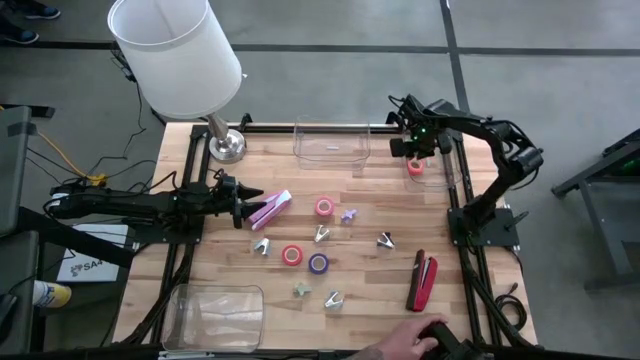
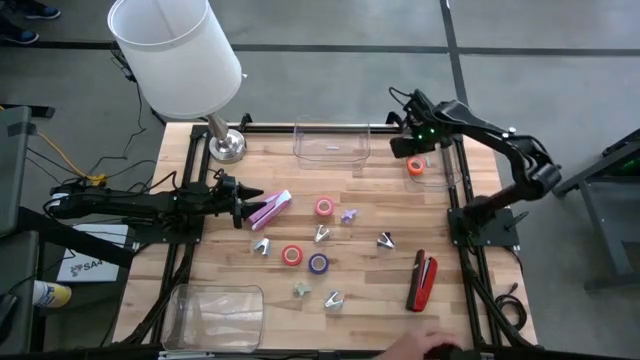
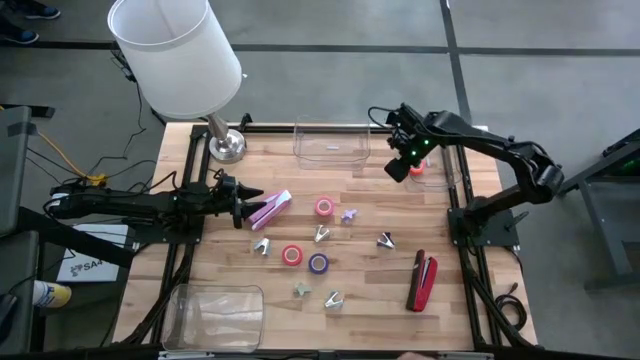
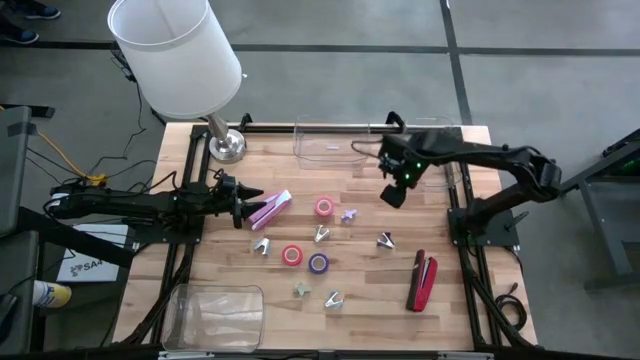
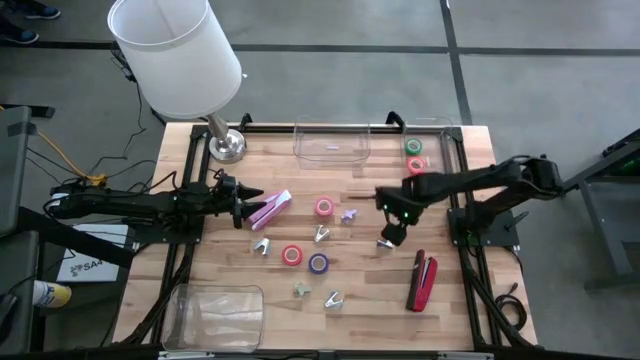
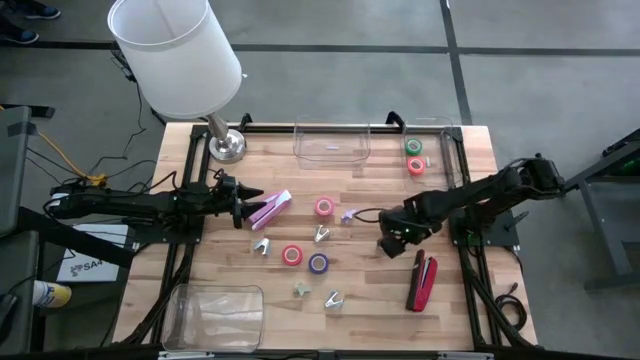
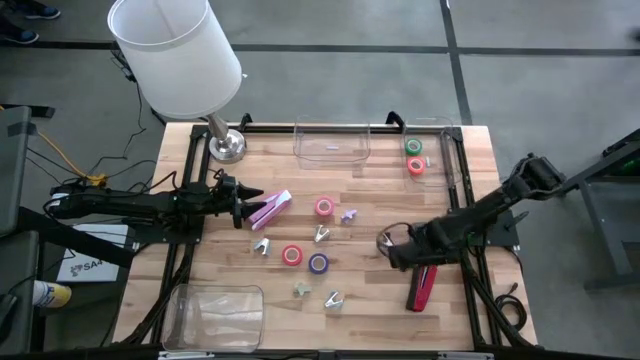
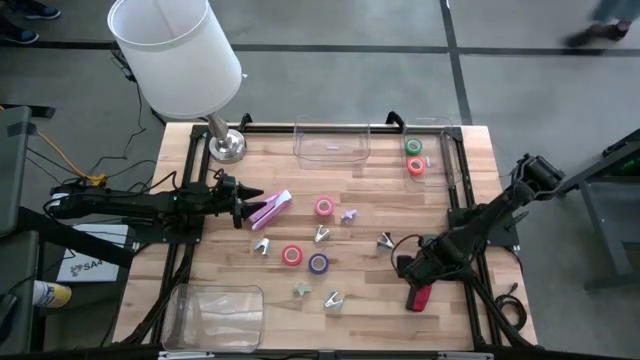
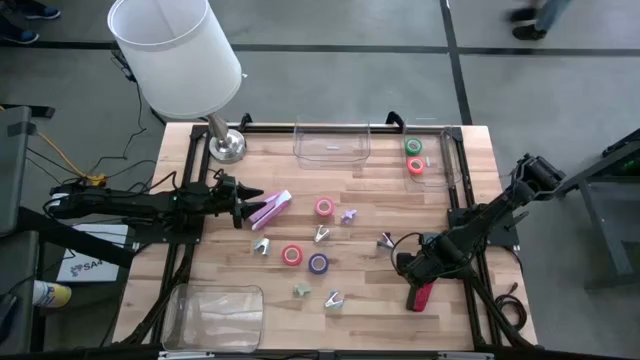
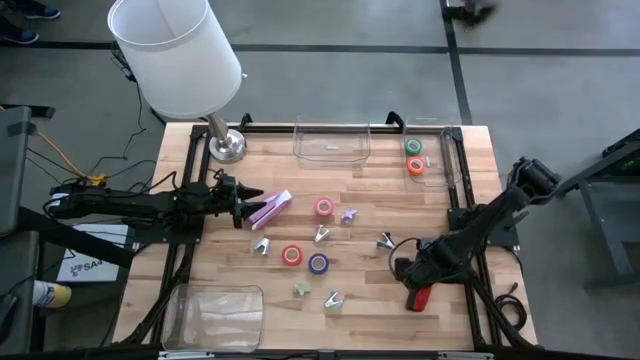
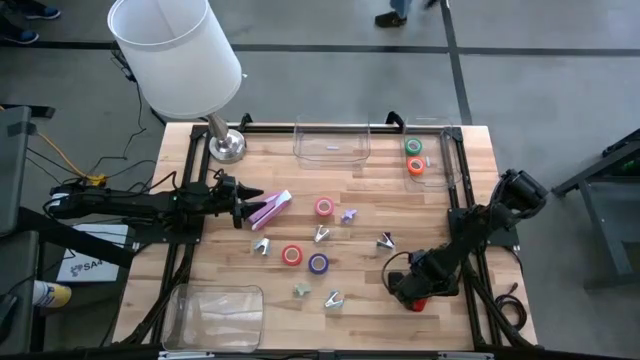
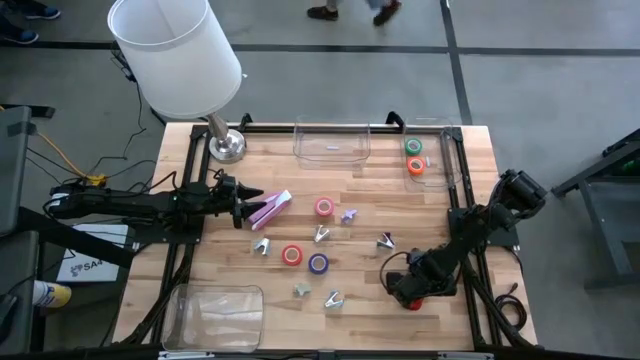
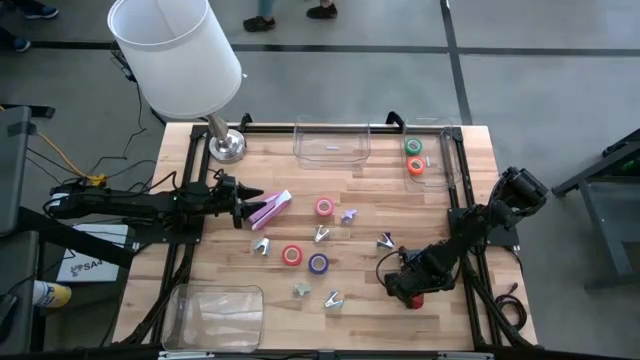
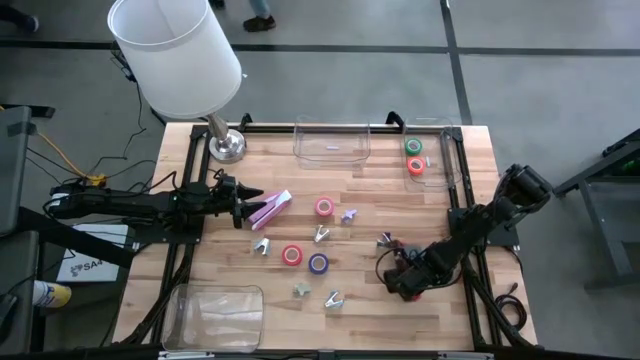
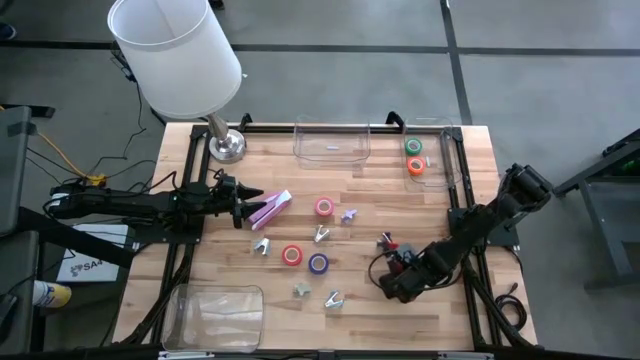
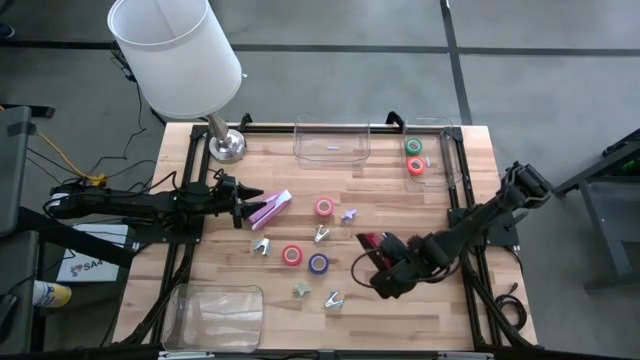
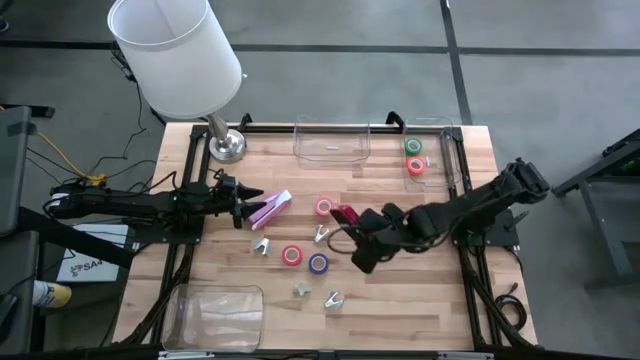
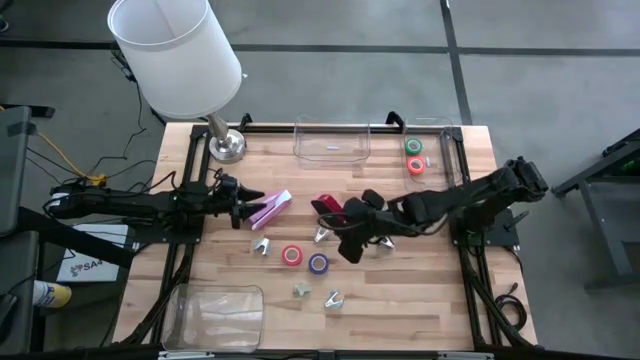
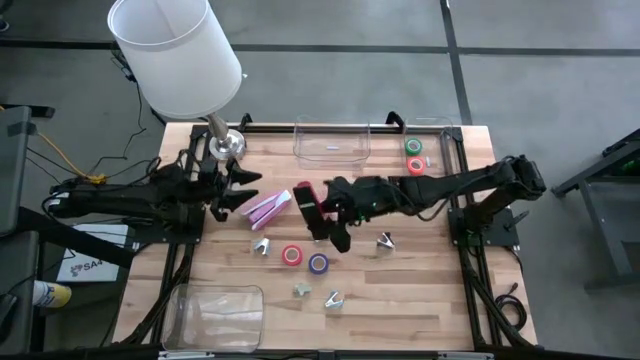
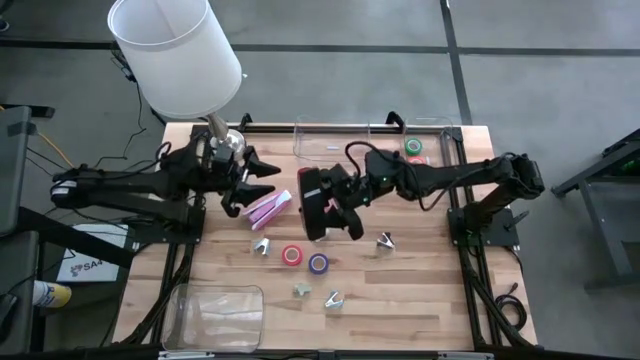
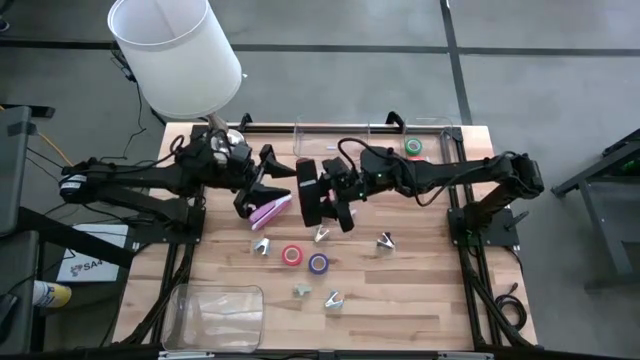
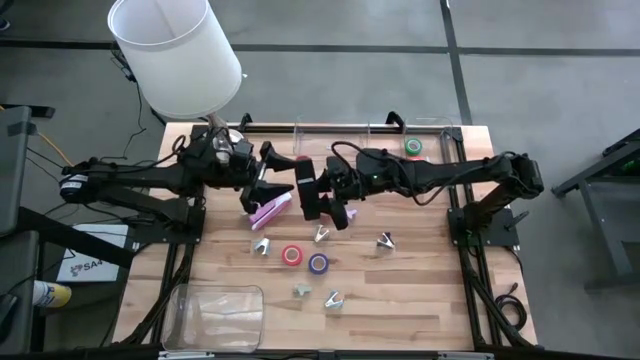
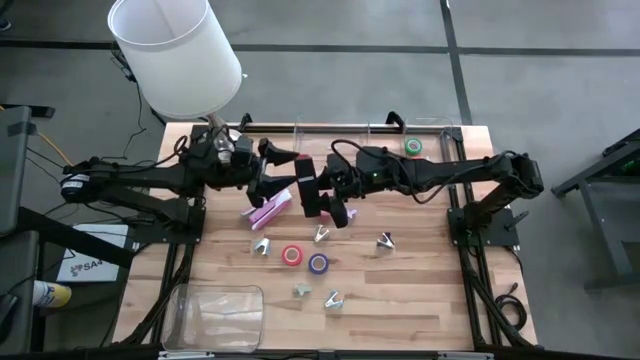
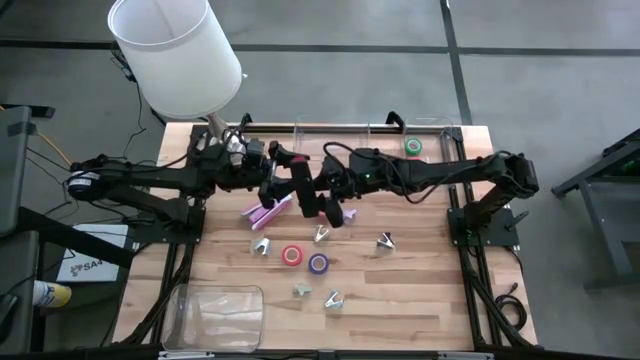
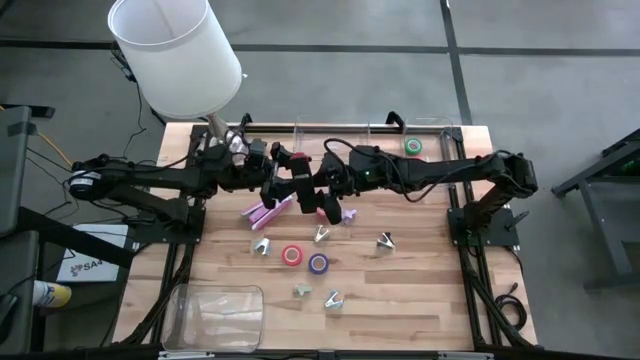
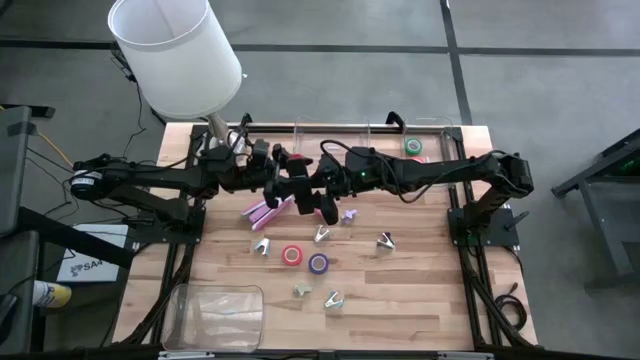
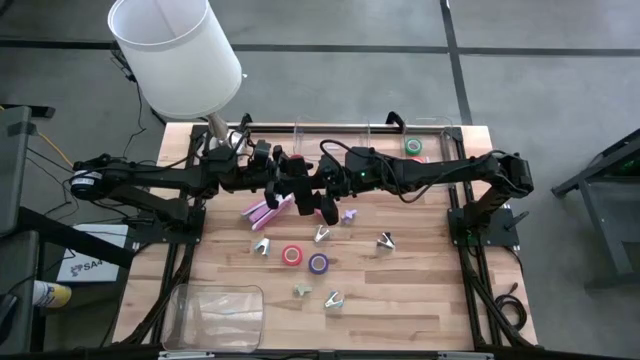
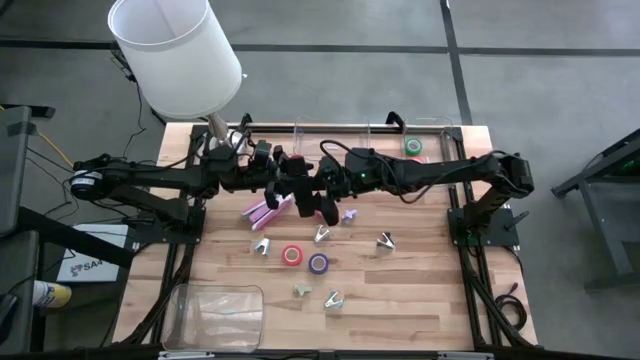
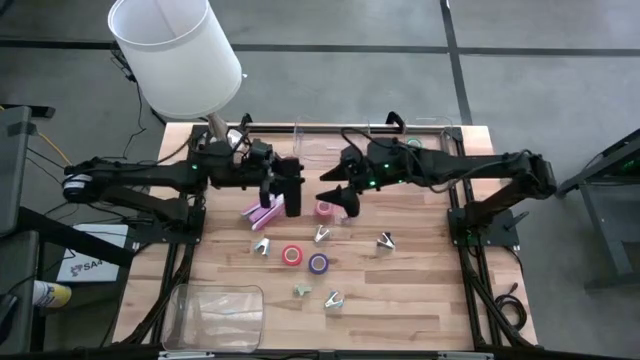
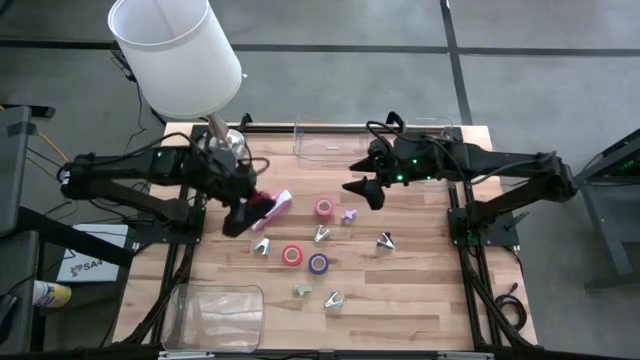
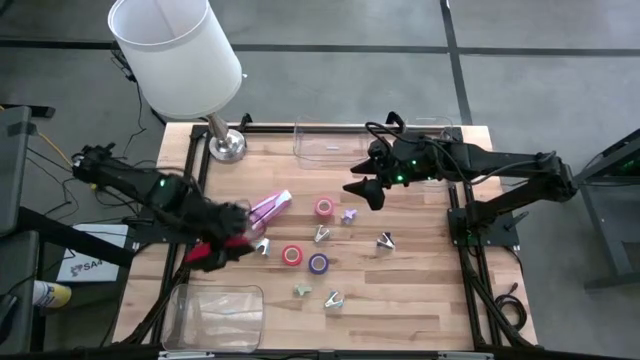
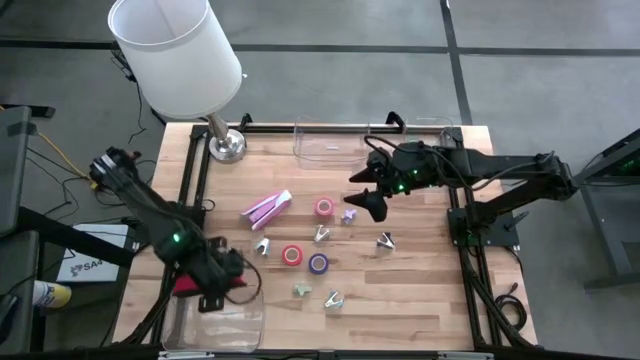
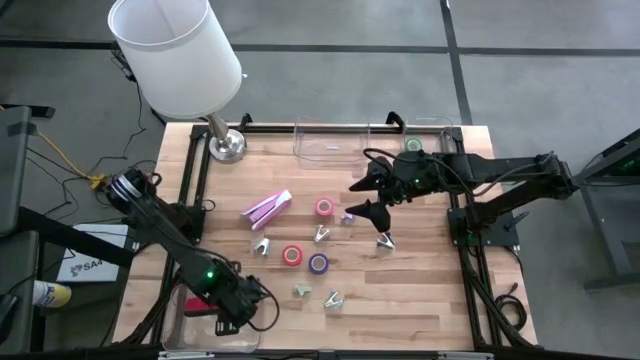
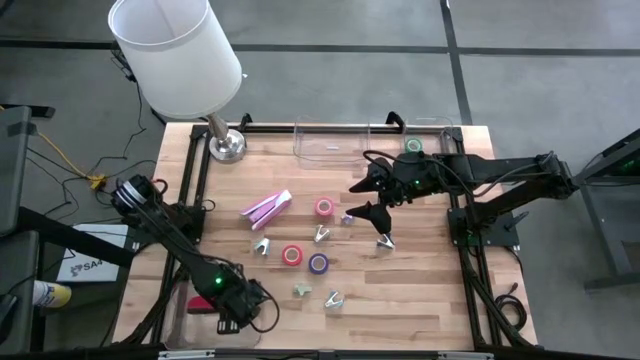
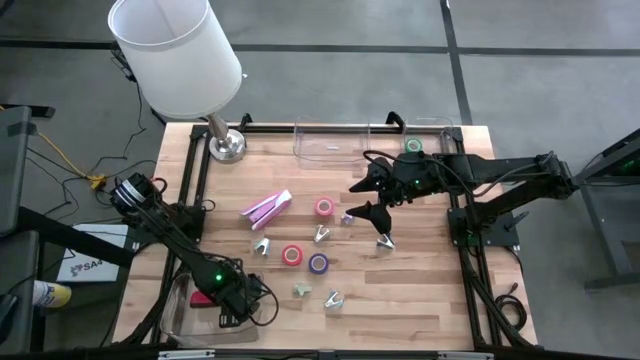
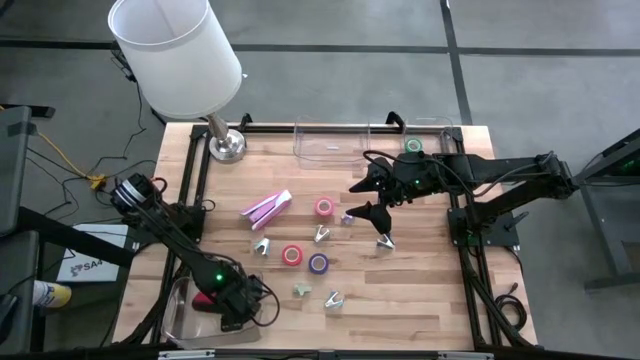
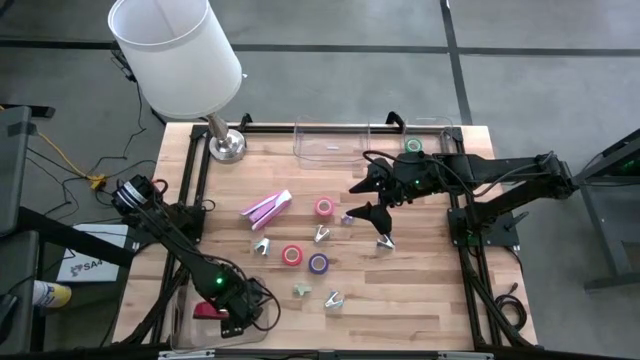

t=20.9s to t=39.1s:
Task: Pick and place Stapler, Stapler remover, tape
Put the red stapler into the bottom transparent bin

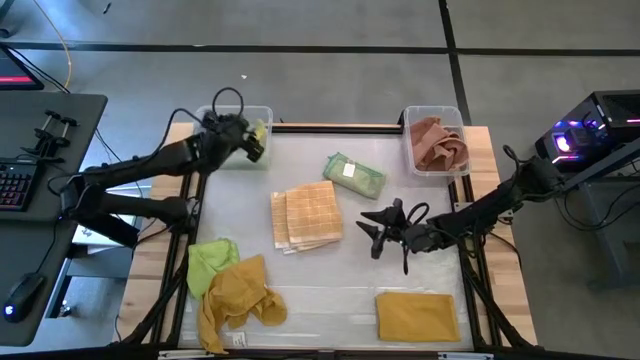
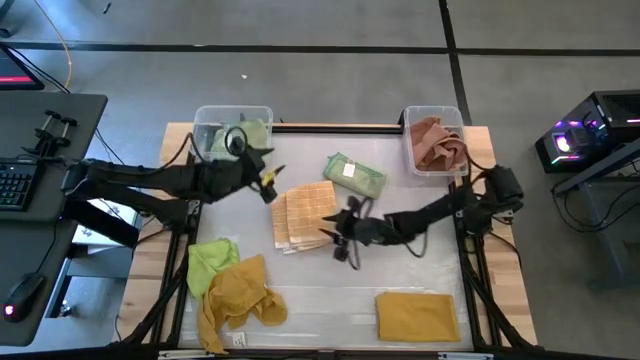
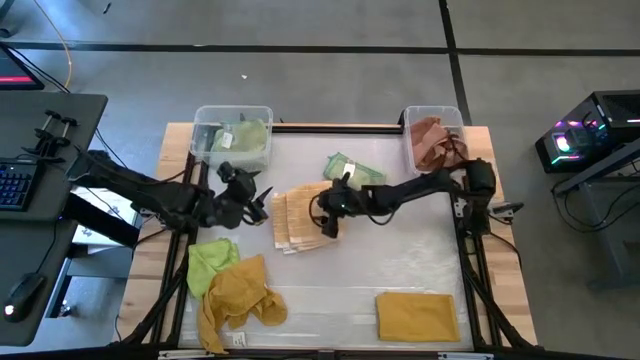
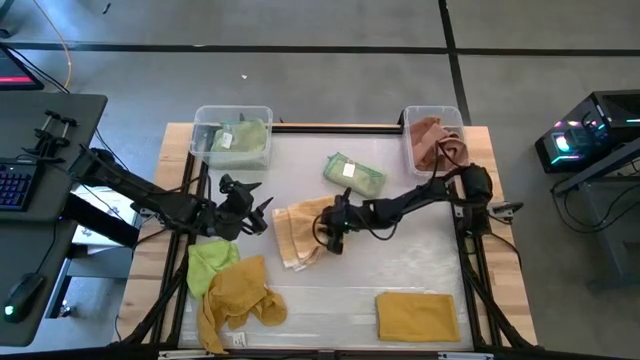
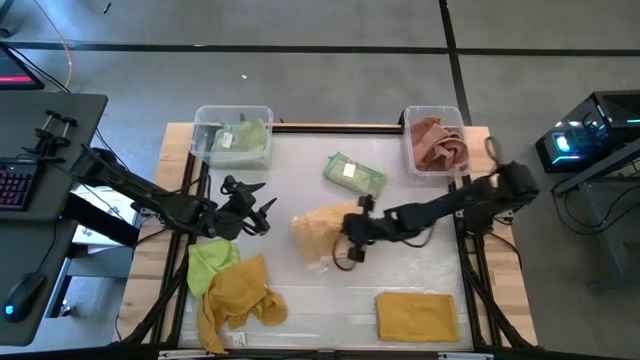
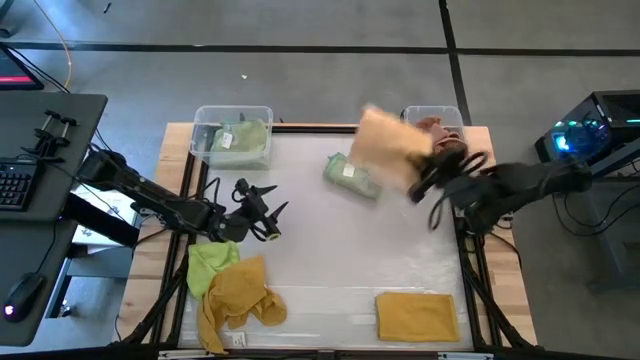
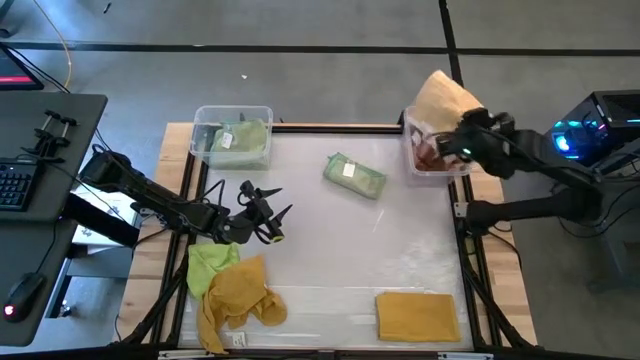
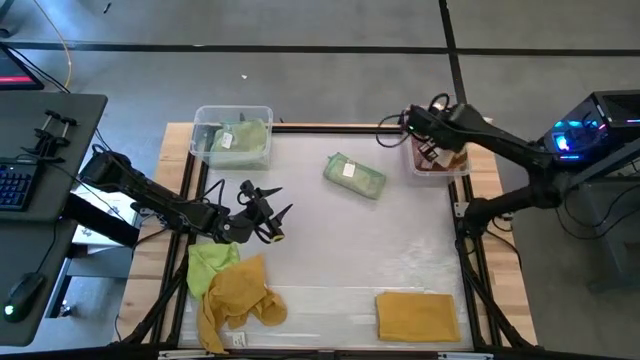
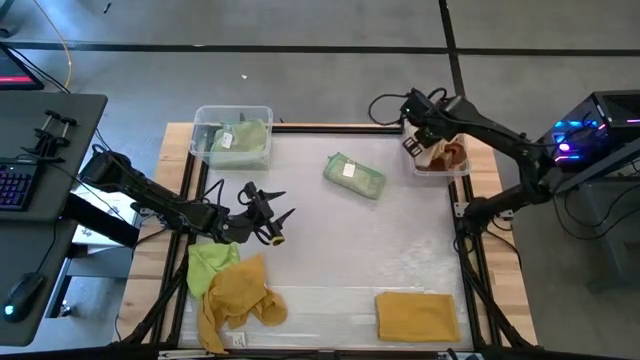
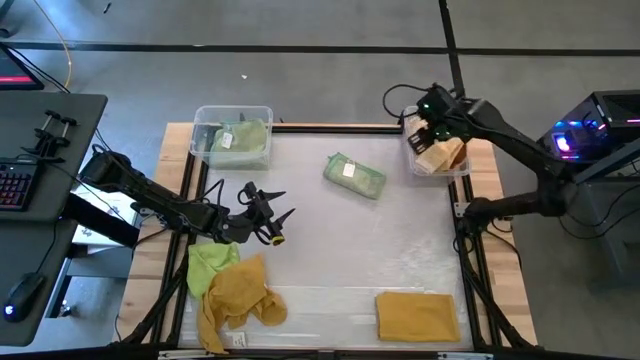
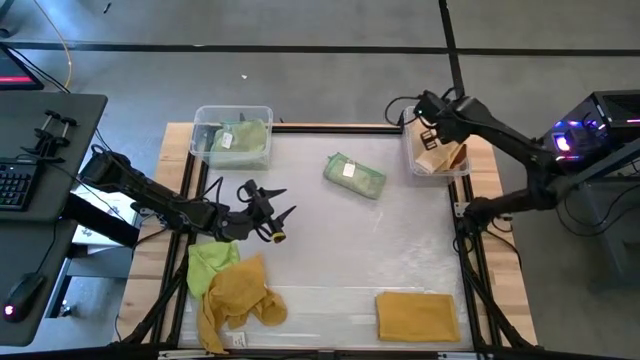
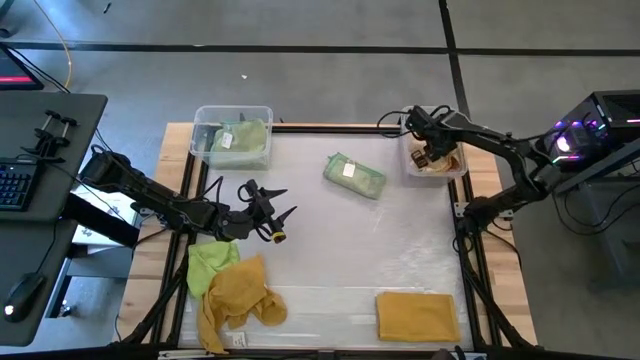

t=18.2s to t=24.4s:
Task: Sort towels by color in basket
Put the light yellow kitchen towel into the right transparent bin
